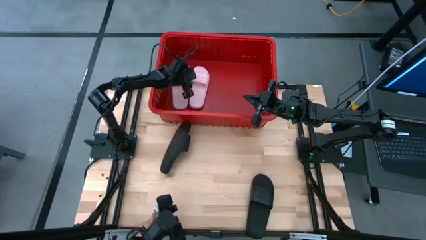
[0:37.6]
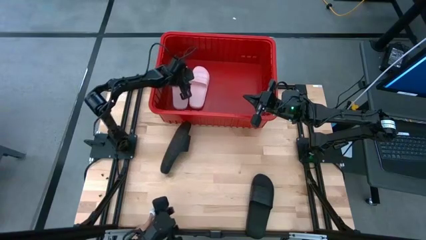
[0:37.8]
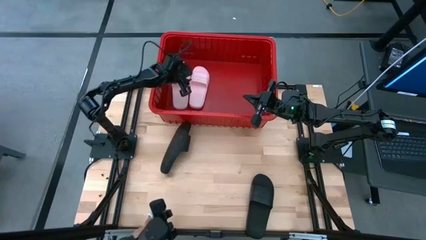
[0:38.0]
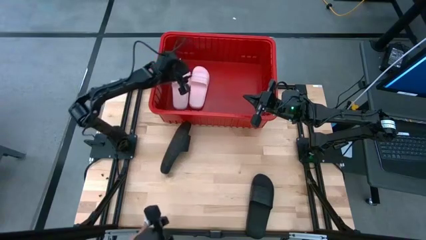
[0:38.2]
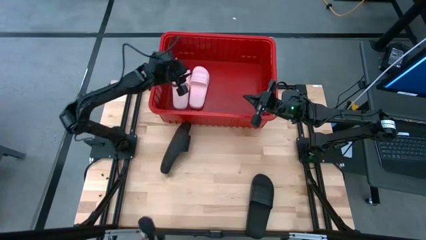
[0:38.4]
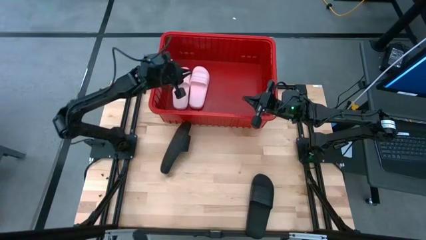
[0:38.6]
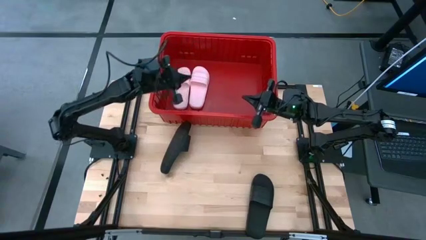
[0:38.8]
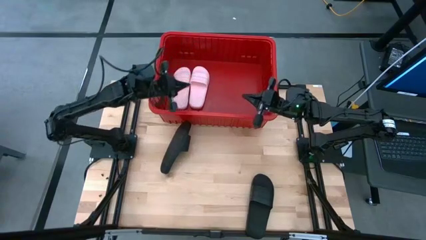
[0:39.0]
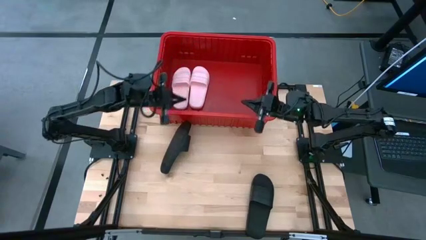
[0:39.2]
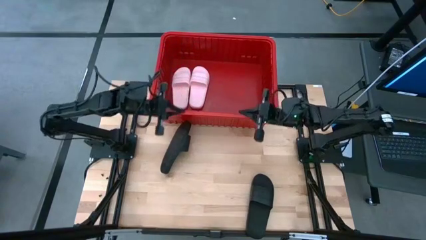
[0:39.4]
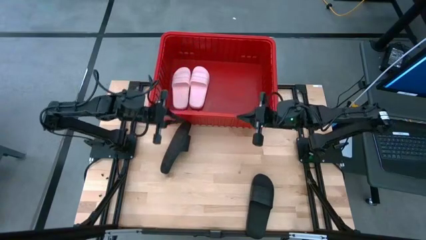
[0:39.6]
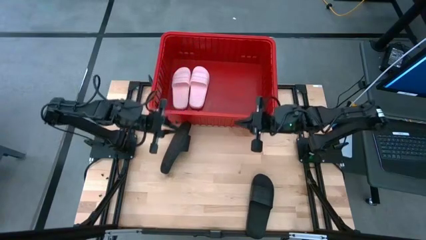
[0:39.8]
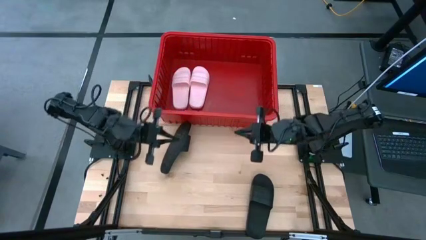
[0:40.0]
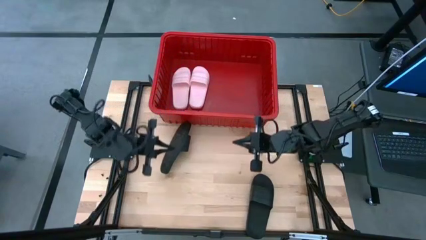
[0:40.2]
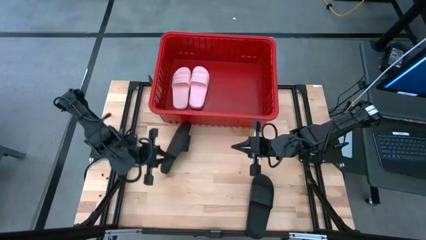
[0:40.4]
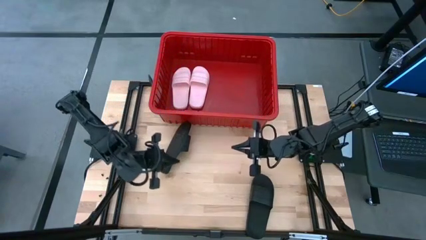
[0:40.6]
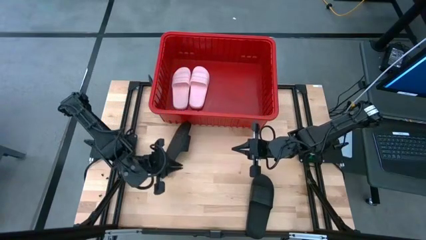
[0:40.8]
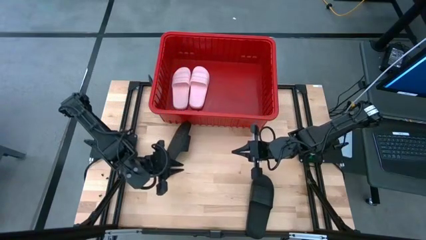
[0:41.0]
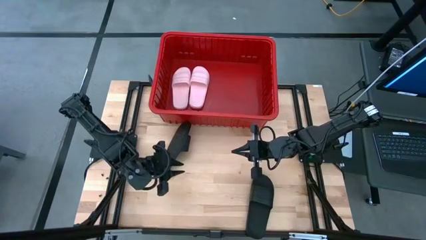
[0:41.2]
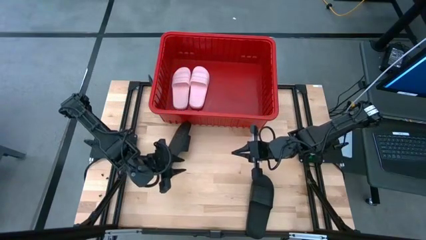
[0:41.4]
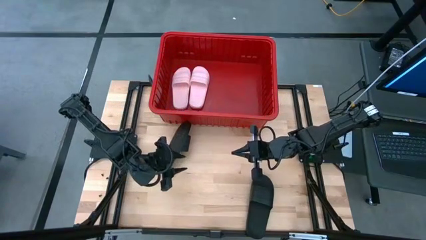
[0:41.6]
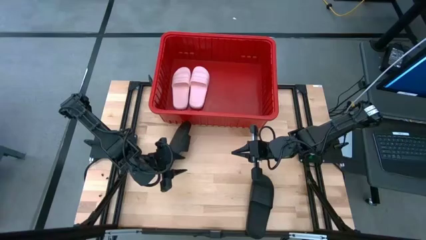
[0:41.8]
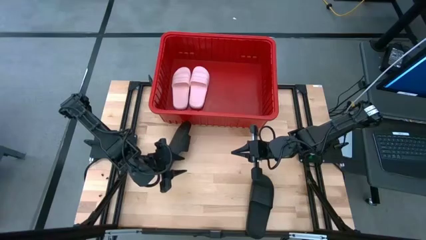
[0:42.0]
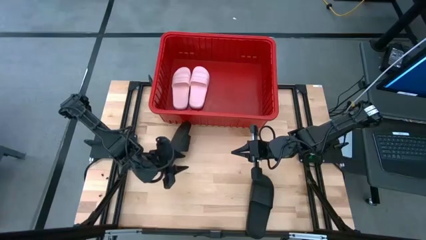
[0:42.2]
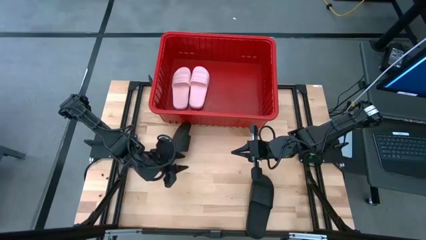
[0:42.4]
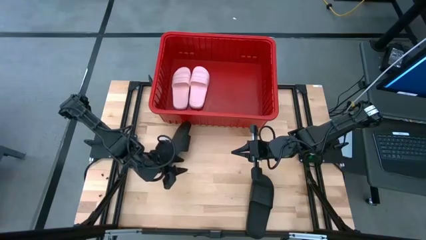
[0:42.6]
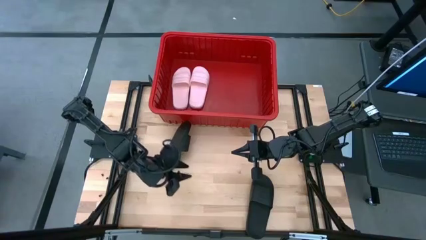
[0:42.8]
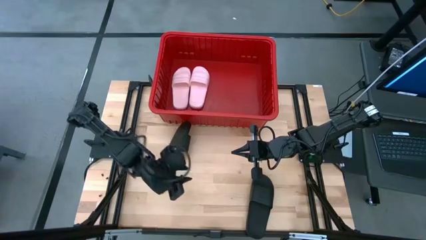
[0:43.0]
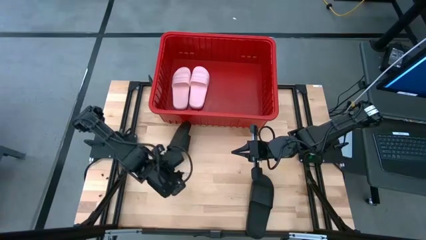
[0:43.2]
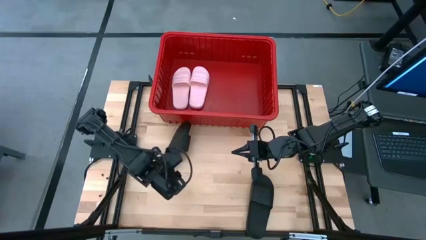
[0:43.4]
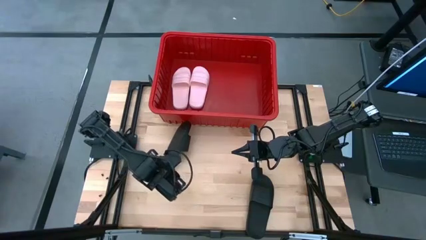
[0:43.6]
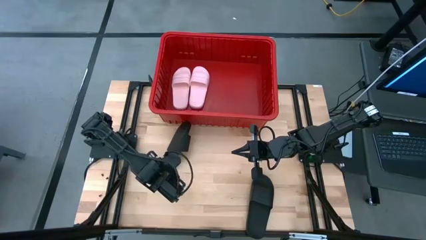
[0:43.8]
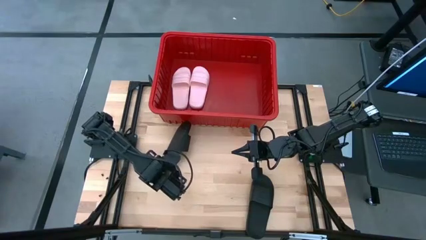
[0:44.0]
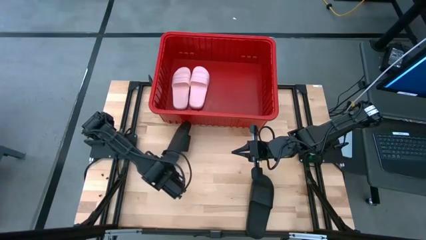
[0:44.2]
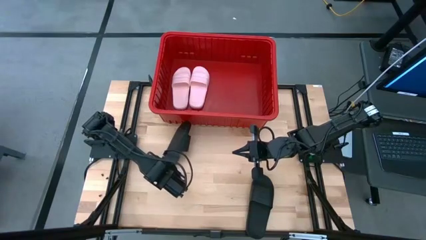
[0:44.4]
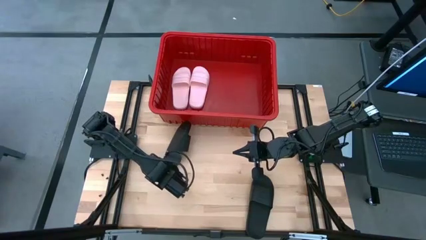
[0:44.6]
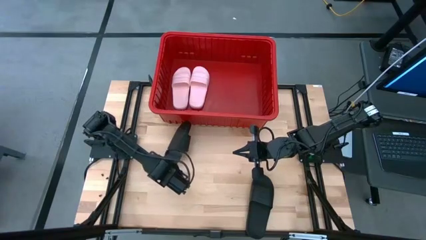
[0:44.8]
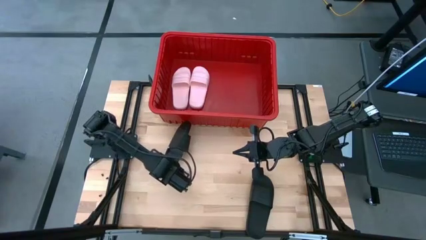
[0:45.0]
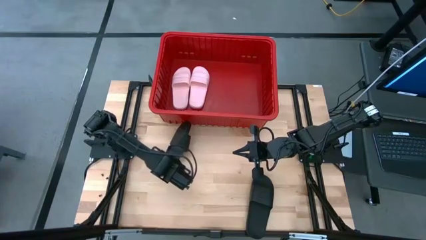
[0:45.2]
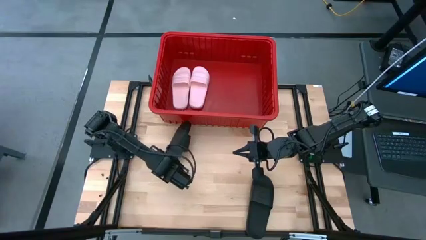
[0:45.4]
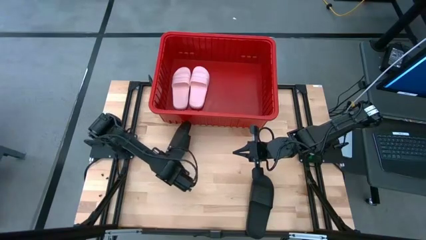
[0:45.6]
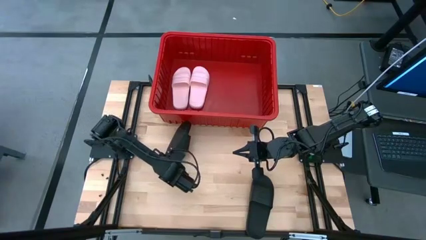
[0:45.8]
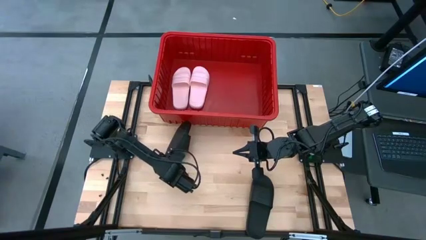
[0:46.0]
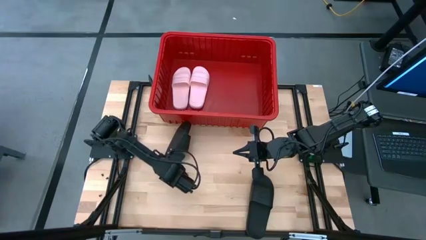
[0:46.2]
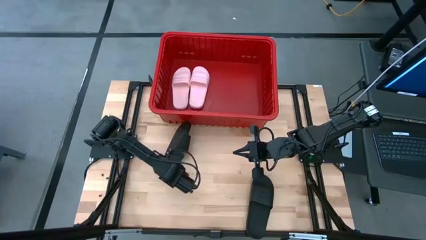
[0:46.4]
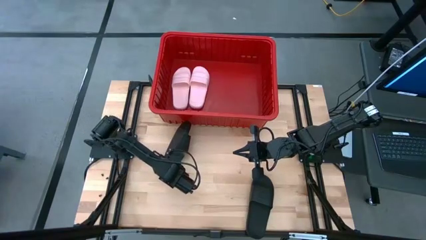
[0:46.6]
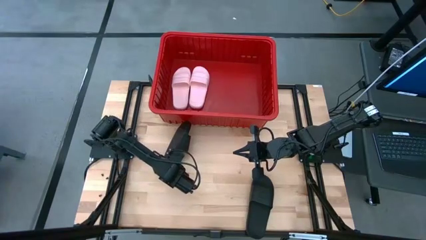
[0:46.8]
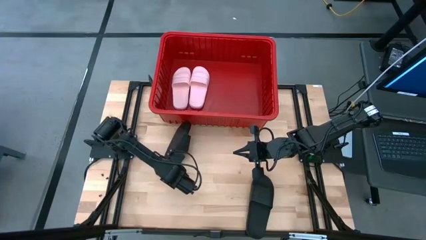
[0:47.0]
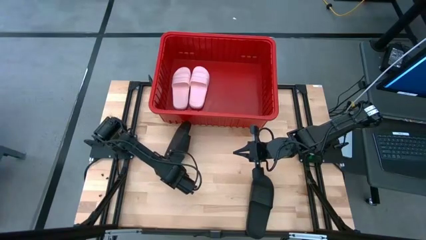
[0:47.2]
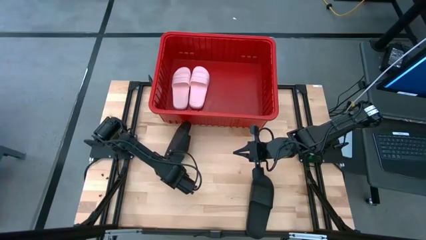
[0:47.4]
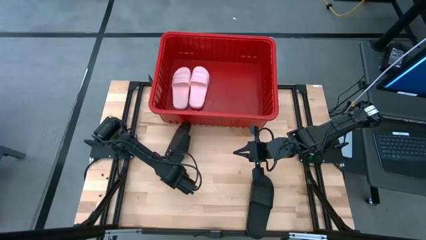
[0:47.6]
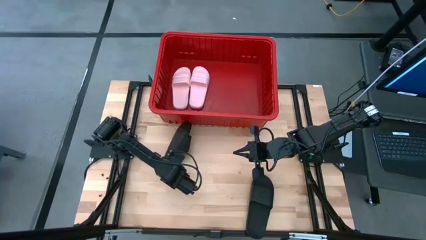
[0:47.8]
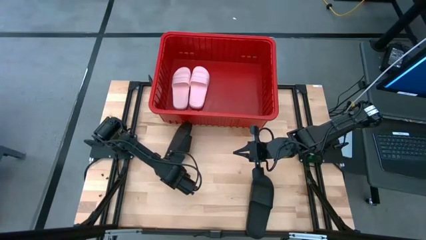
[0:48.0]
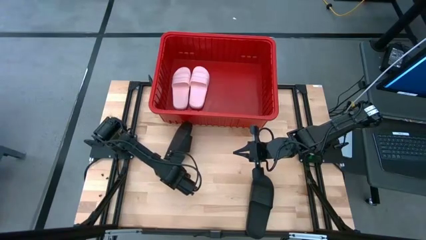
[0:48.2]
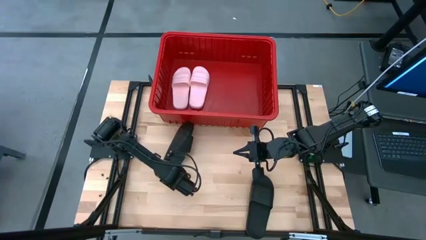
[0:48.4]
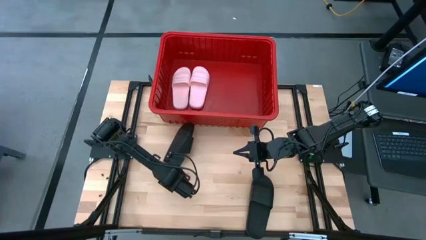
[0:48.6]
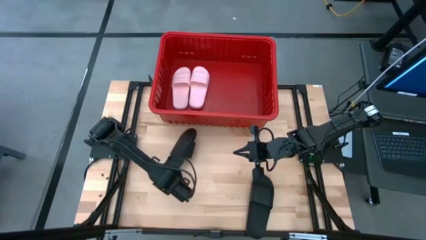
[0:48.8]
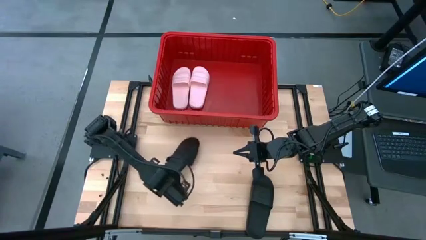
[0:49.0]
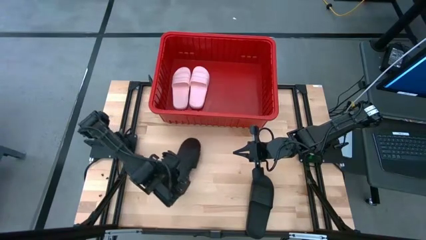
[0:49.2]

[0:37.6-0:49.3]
Task: Pick and place slides into bin
Put the left black slipper into the red bin

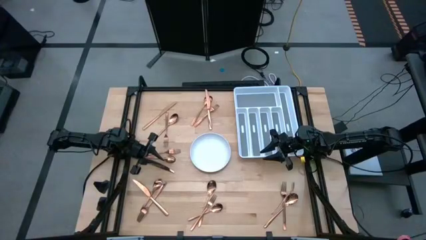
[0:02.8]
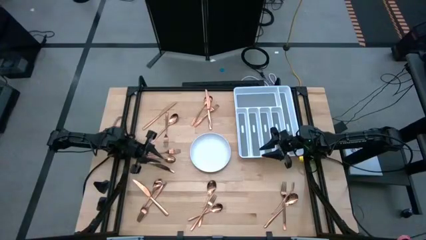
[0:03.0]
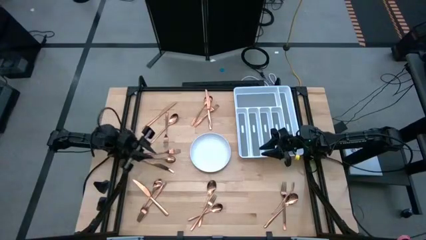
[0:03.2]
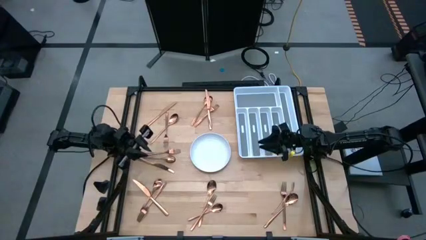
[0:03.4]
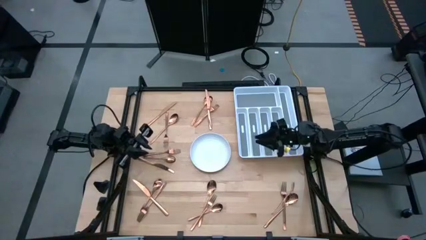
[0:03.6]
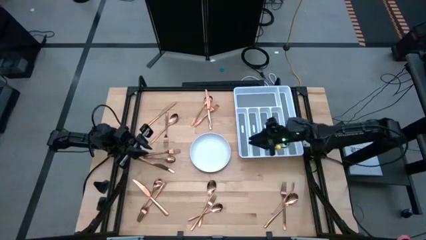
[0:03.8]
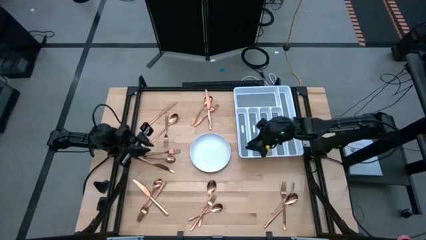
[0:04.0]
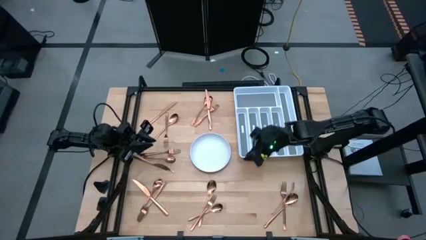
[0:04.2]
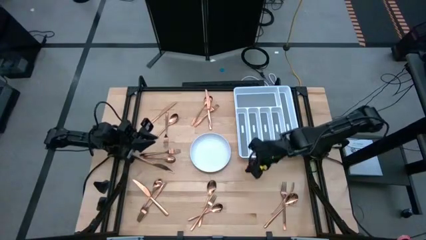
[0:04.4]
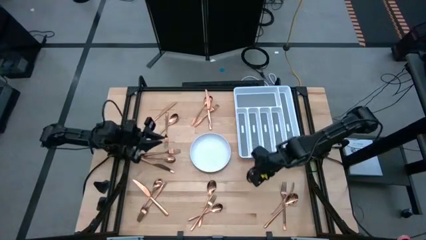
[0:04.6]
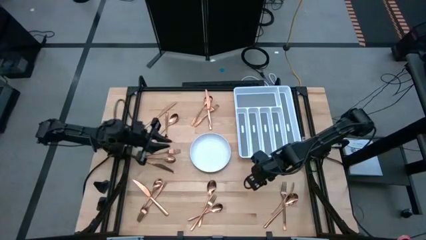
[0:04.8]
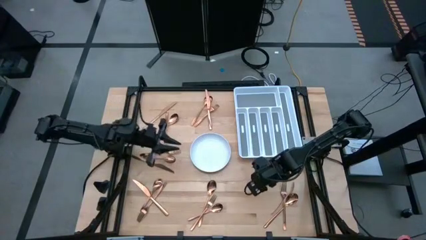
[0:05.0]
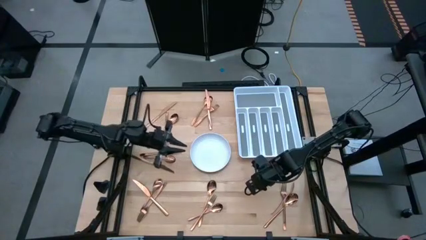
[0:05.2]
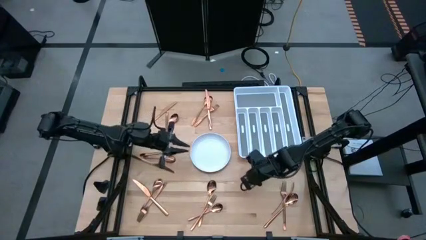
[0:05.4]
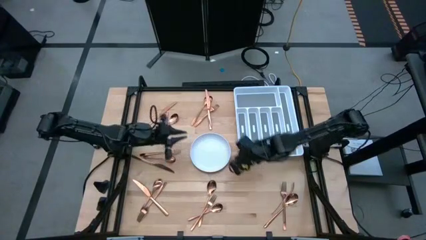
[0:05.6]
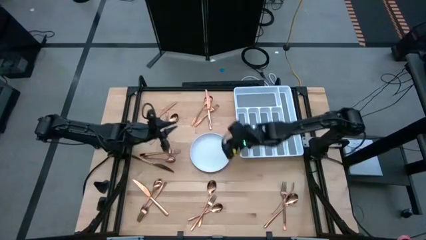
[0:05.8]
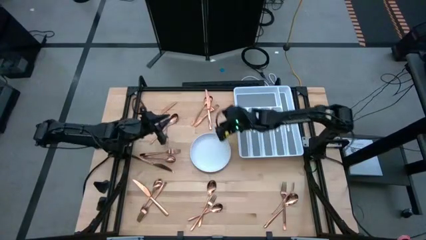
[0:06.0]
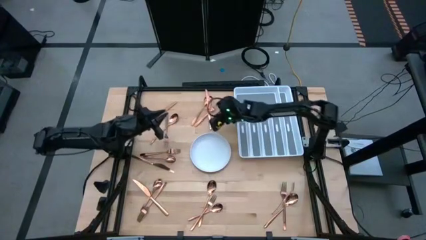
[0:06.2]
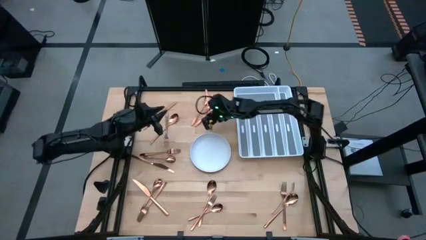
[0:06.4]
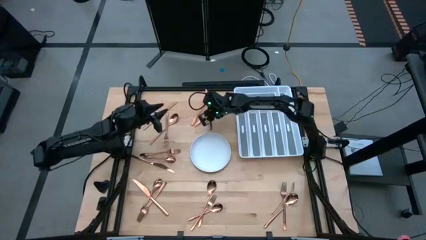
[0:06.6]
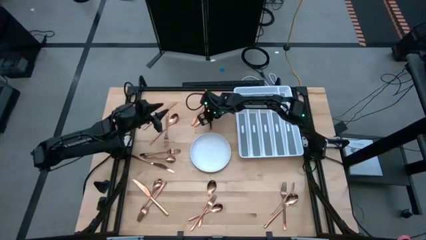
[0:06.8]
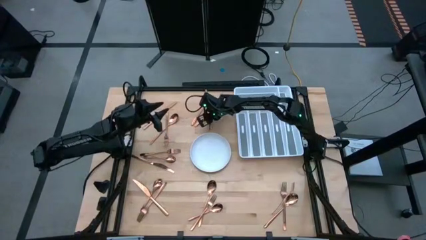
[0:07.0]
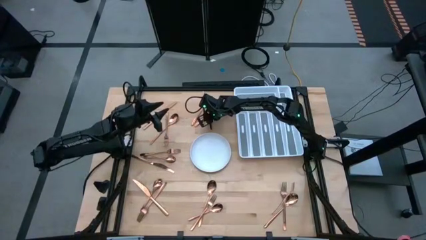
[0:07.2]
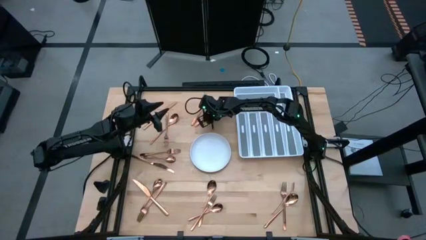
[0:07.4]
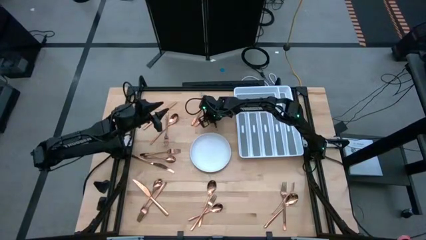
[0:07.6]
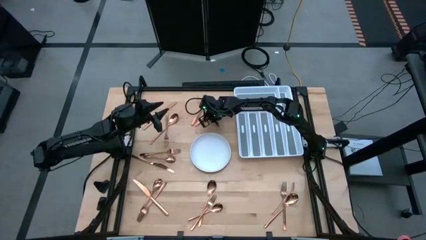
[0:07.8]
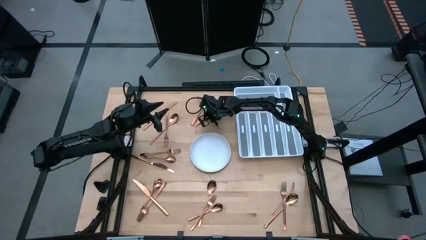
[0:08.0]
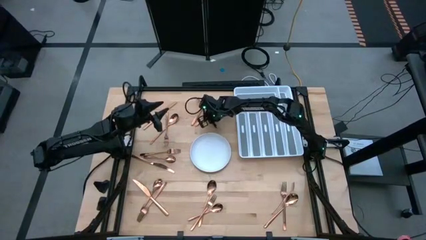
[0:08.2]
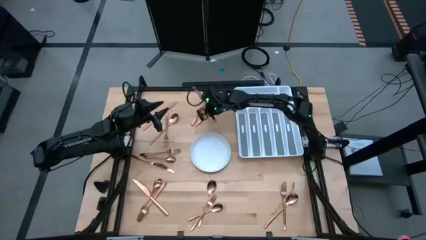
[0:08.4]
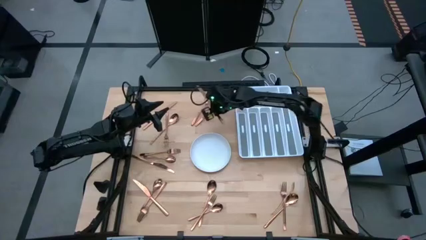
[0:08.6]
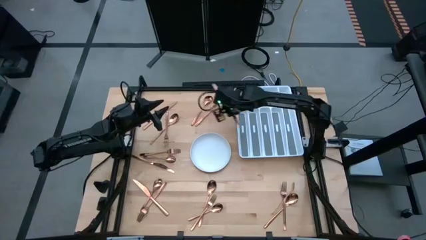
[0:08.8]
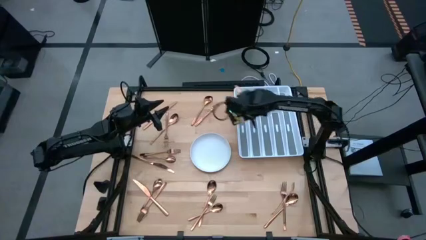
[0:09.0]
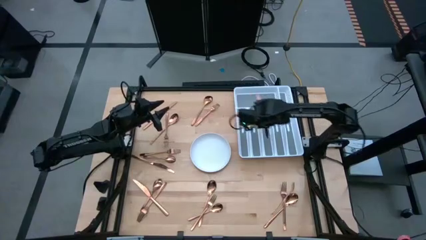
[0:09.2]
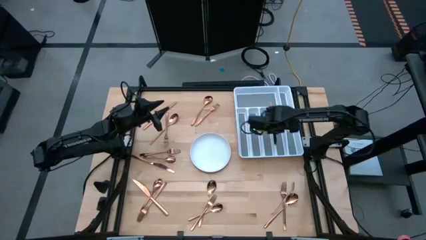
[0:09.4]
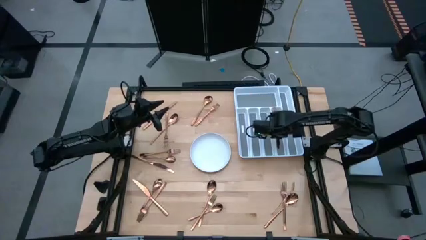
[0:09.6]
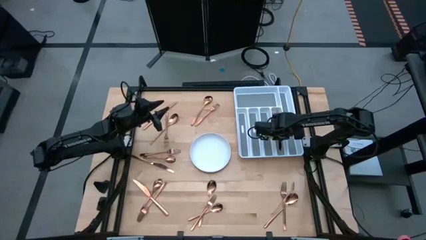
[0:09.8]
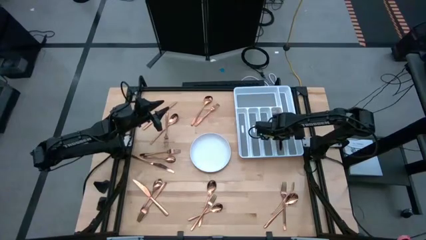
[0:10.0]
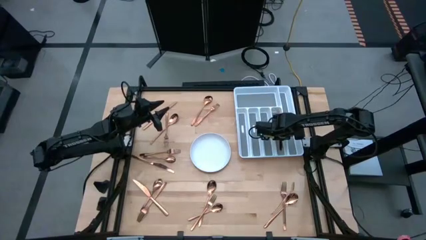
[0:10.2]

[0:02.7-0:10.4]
Task: Sort silverware
Put the knife in the silverware tray
